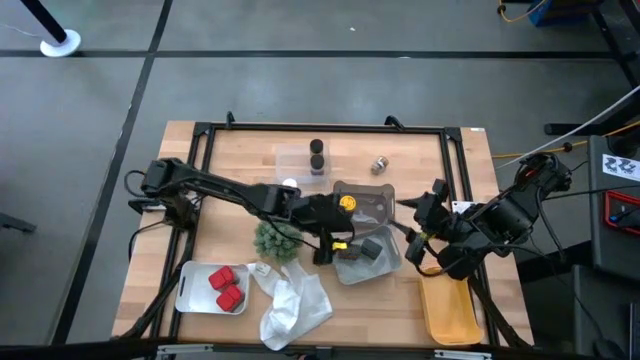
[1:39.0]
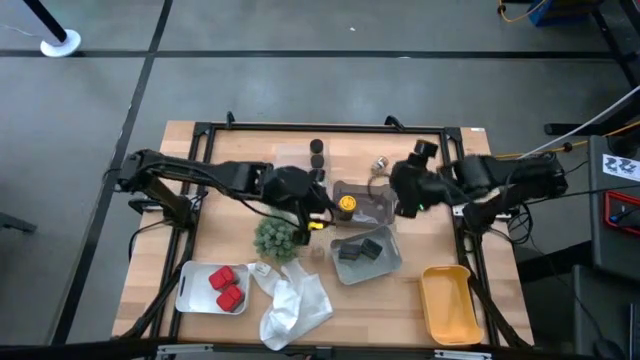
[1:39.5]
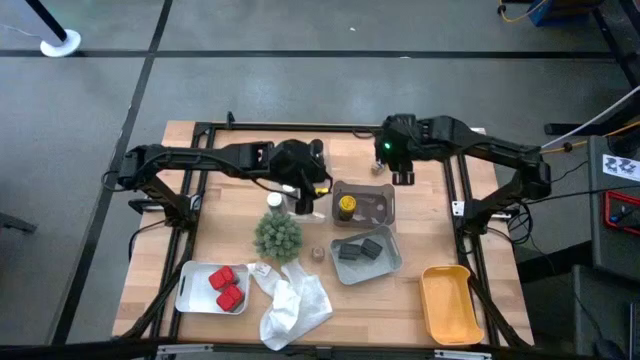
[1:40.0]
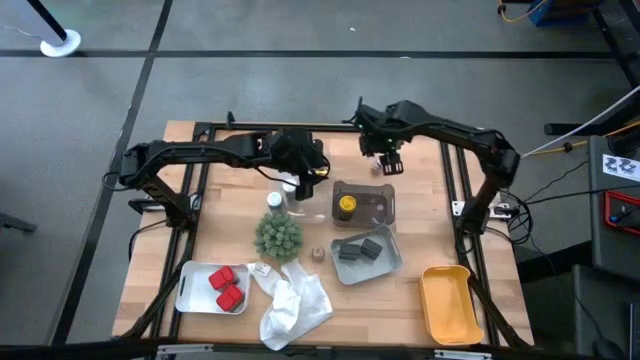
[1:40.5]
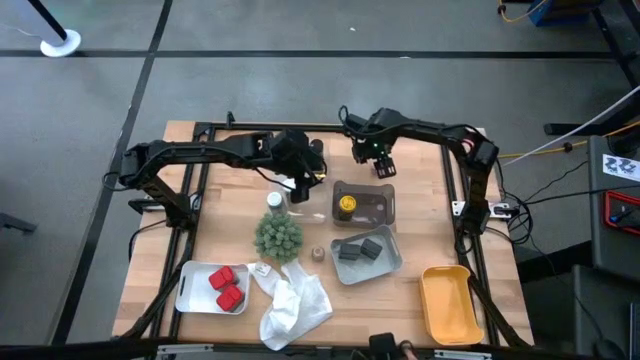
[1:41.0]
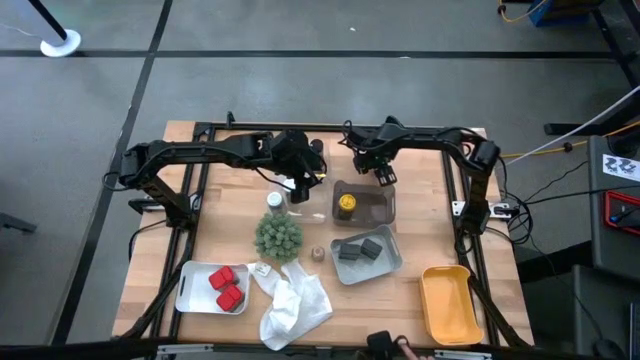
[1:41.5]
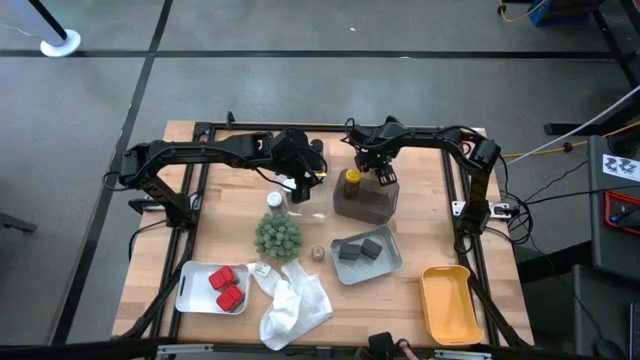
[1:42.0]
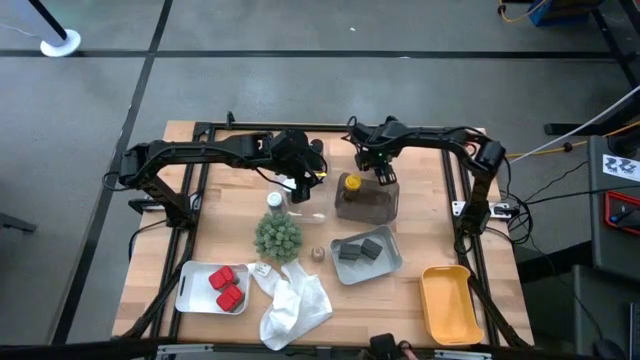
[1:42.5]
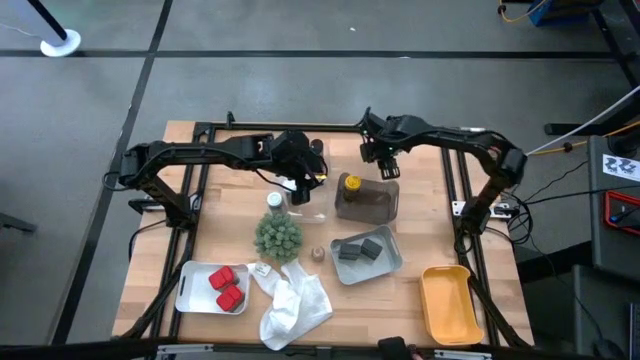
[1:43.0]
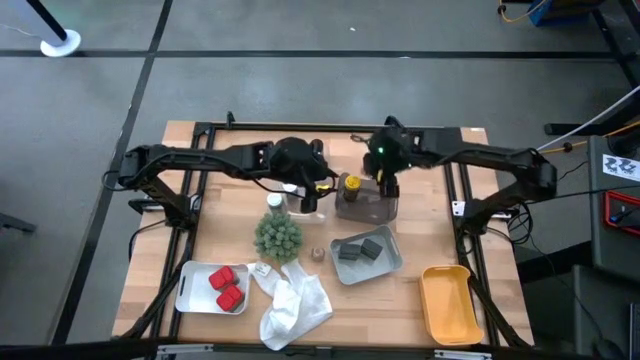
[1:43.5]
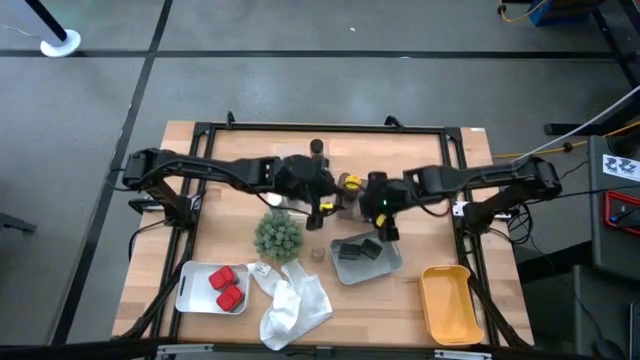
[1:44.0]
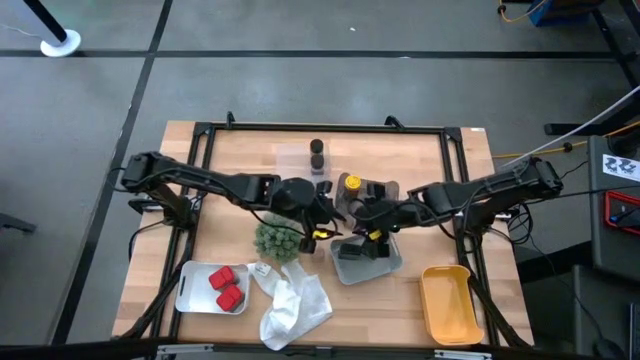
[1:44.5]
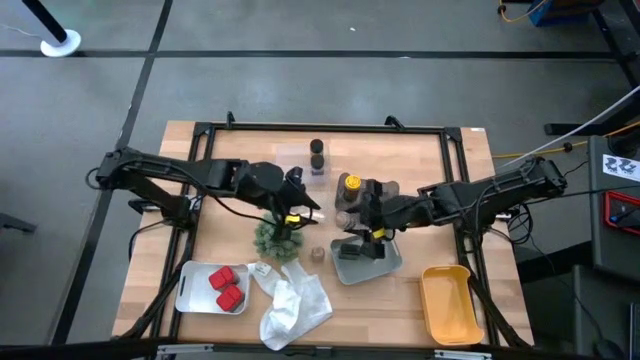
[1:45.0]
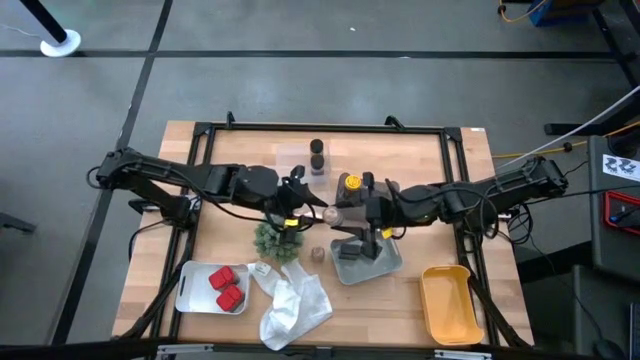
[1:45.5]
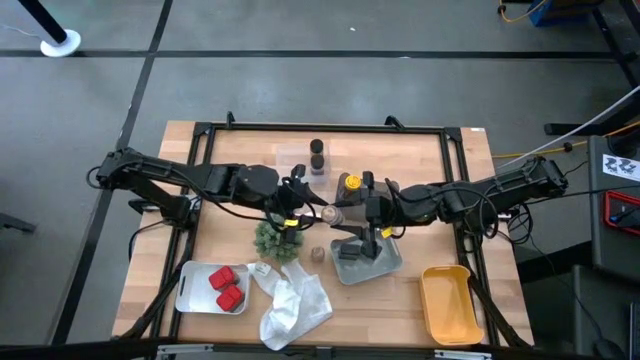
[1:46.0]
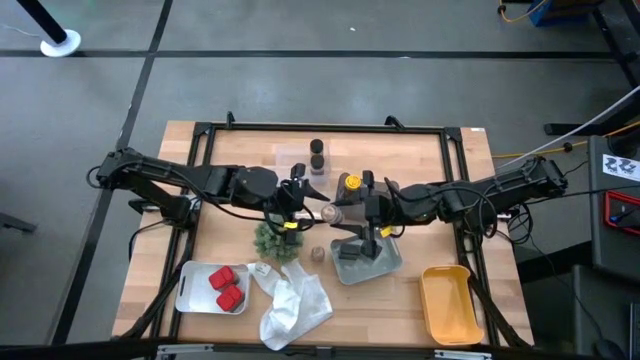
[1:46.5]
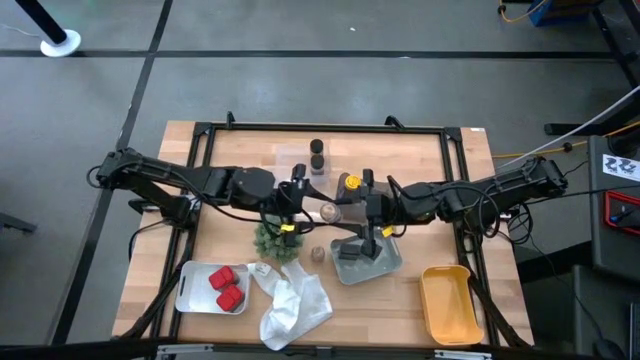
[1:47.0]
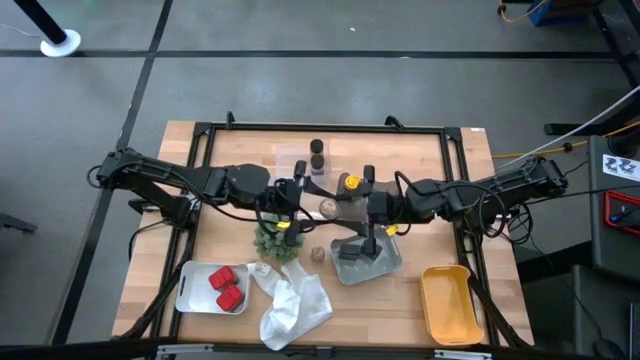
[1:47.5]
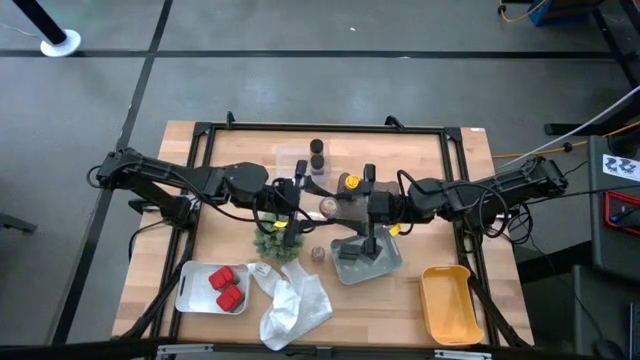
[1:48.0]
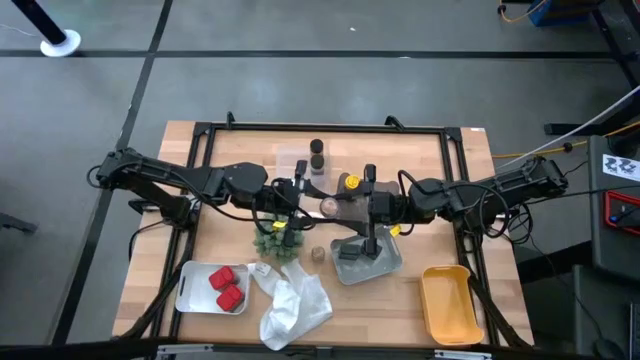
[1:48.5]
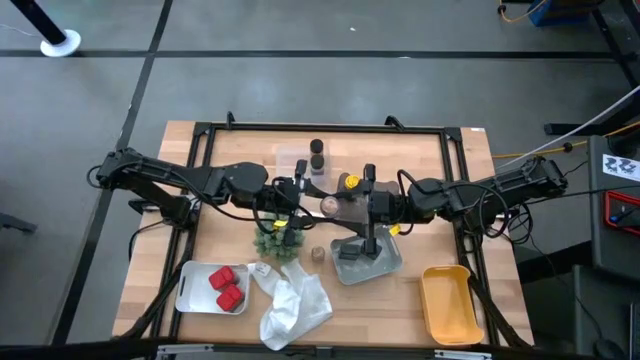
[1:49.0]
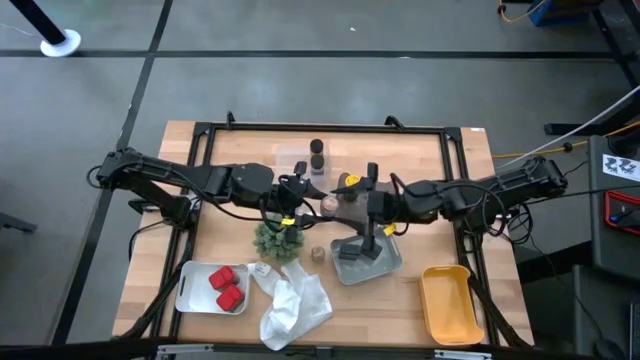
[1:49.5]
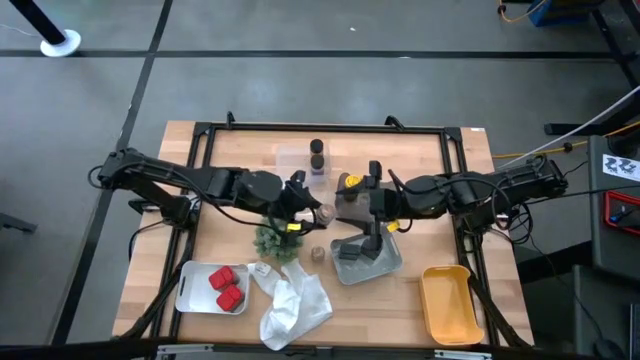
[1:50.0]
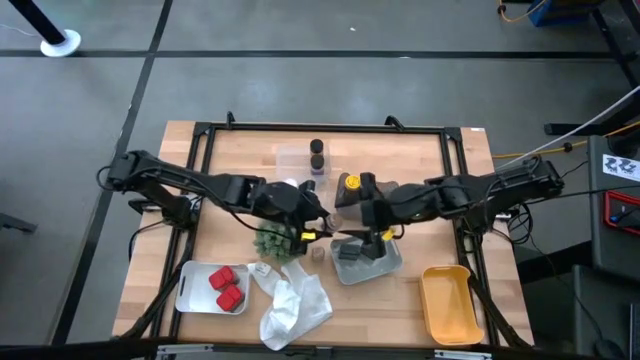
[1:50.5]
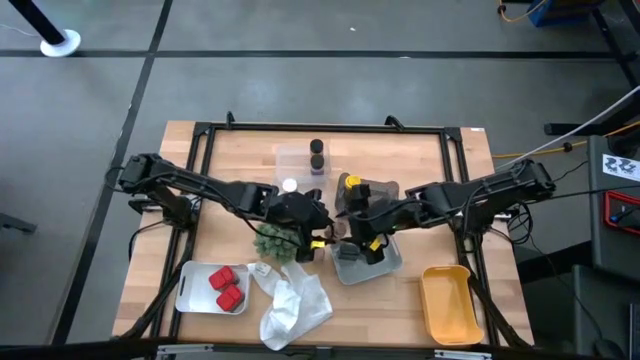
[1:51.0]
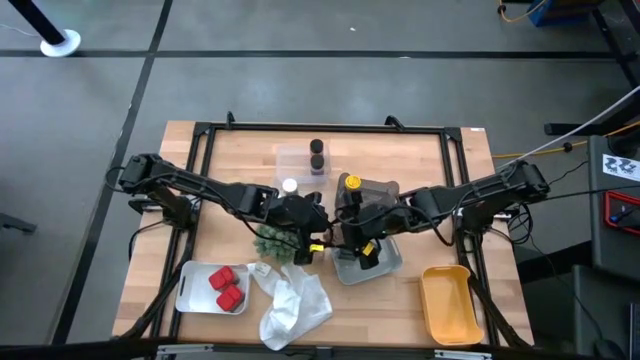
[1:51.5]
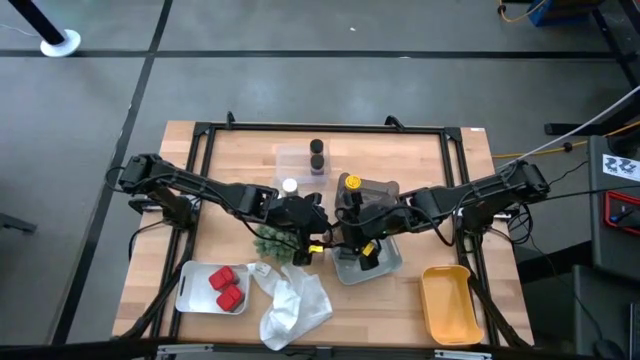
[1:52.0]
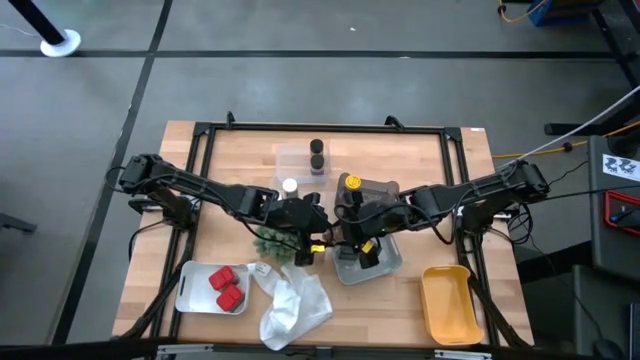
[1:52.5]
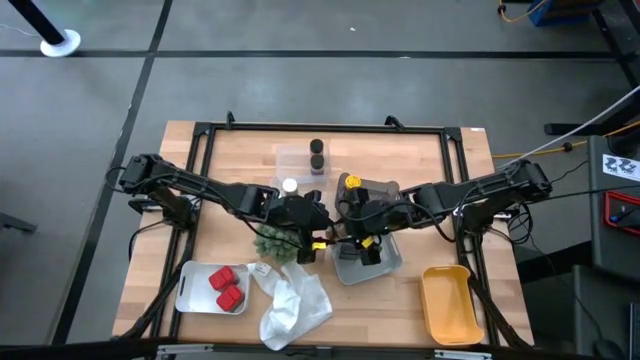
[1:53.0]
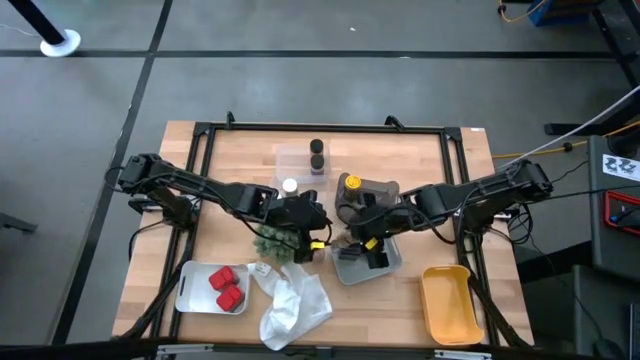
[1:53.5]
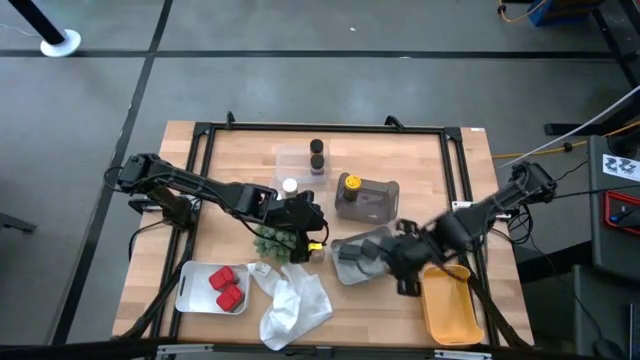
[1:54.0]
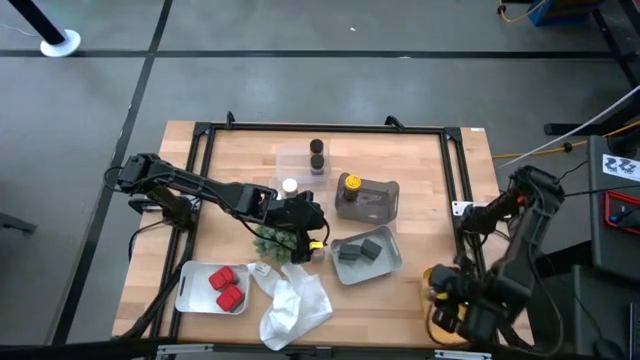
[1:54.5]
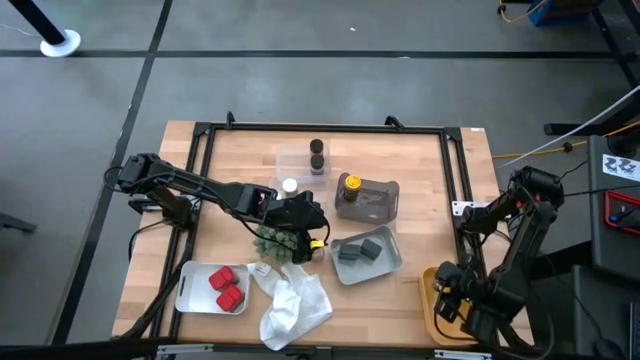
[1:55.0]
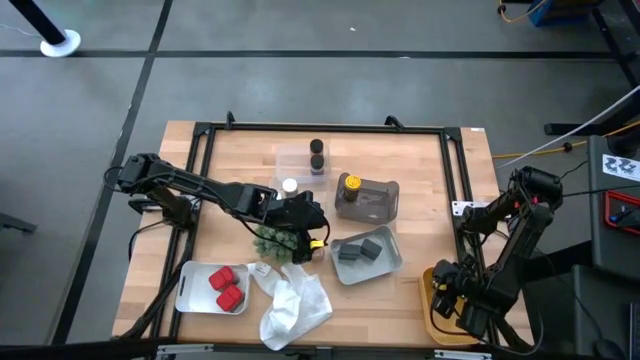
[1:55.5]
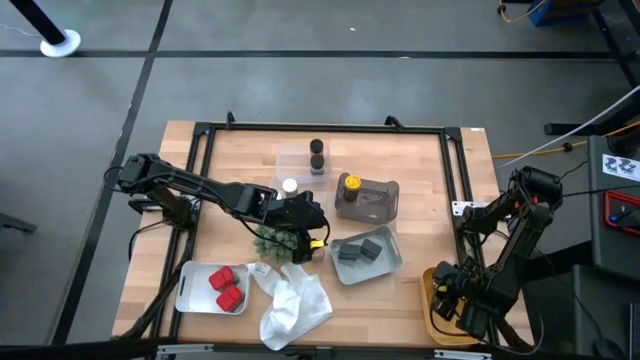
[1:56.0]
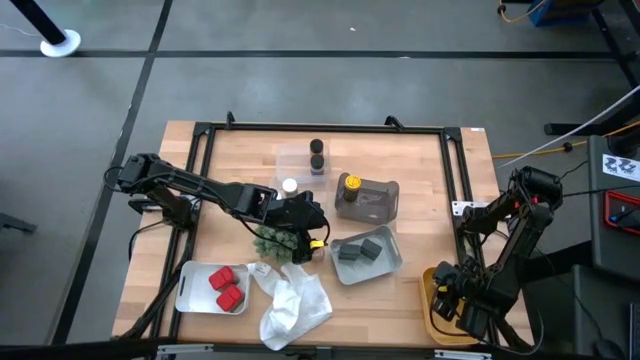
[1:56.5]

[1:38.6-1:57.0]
Task: Sort spices by type
Put the top brown seasoning bottle into the yellow bin

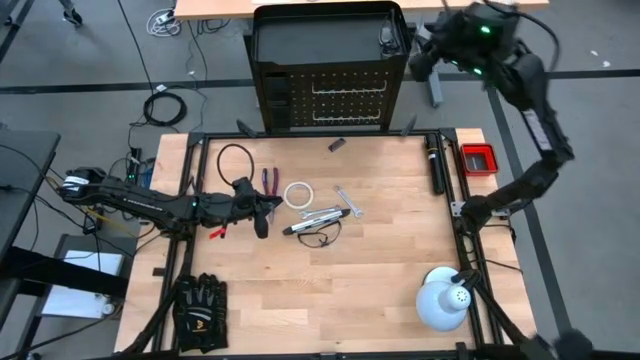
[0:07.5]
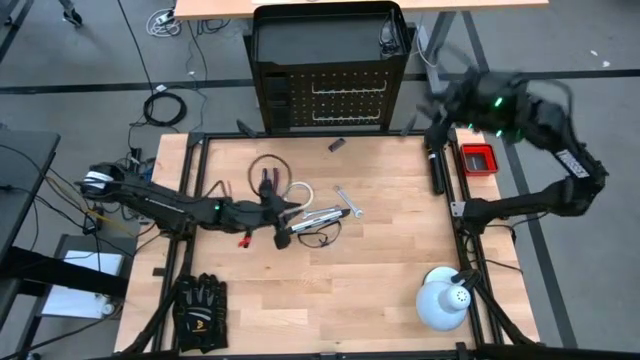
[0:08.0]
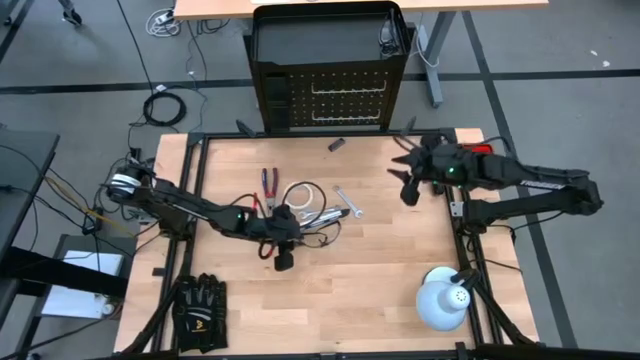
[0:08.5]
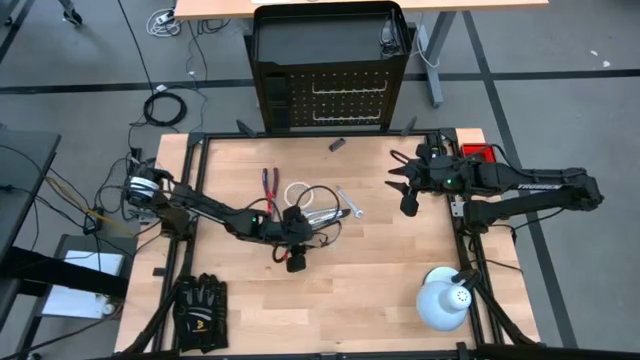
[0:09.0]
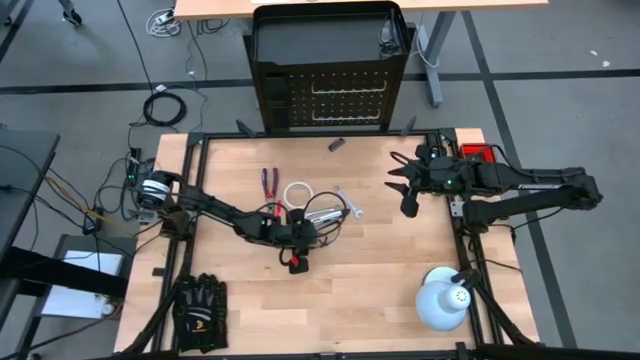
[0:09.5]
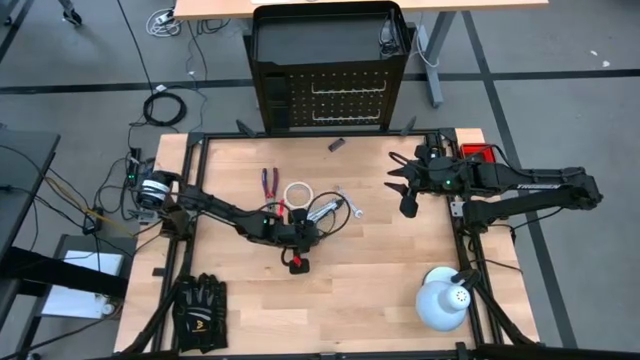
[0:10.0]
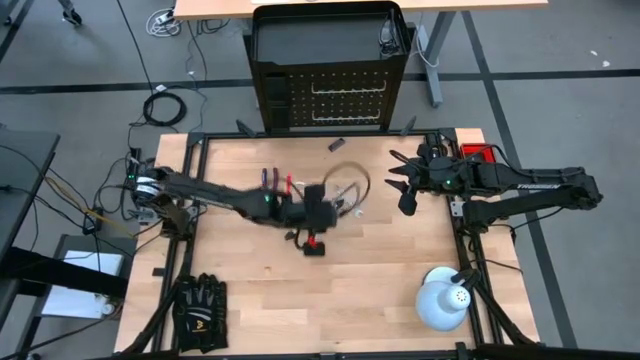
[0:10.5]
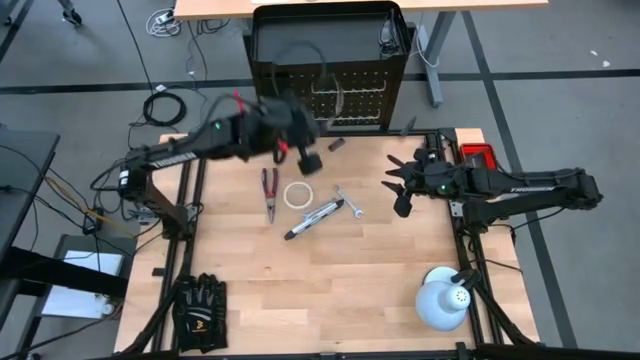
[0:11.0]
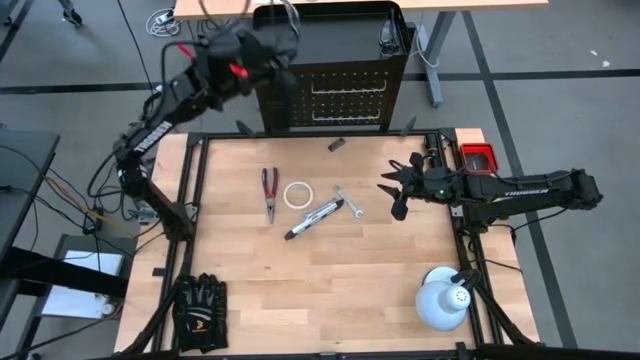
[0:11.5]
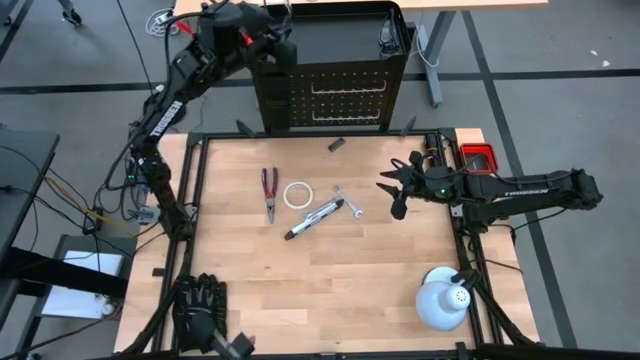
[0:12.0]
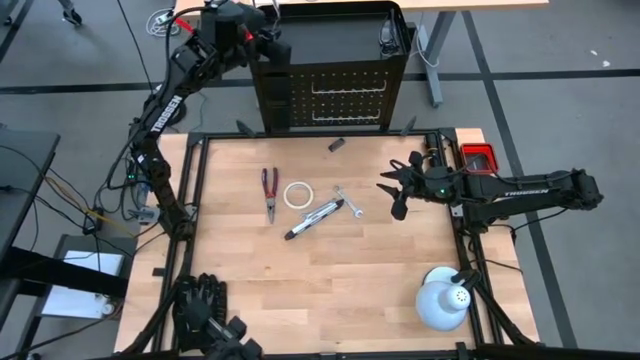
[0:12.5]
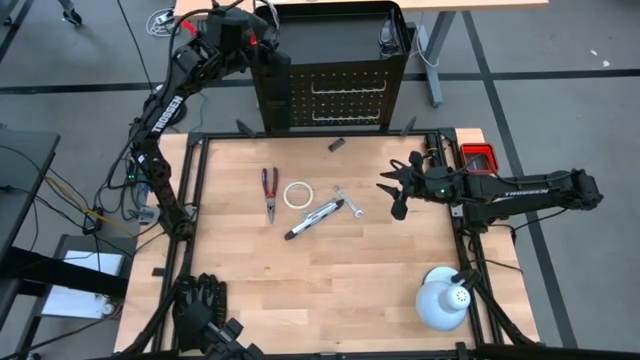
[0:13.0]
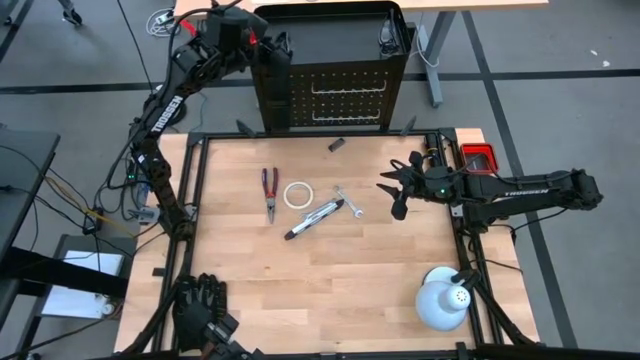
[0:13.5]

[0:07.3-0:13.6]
Task: Hang tools onto peg board
Put the black safety glass on top of the peg board
